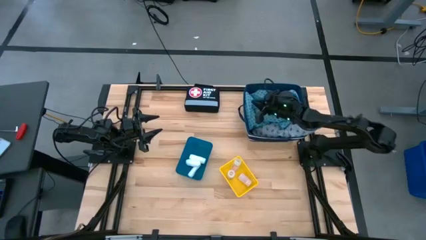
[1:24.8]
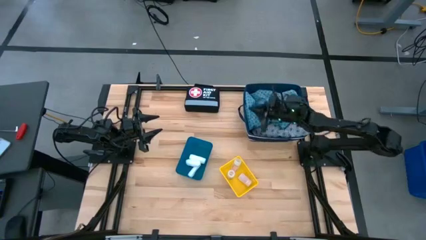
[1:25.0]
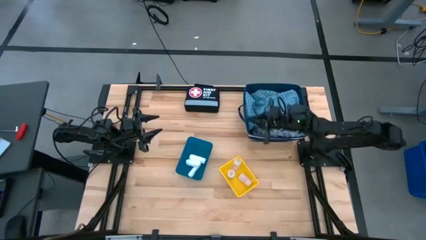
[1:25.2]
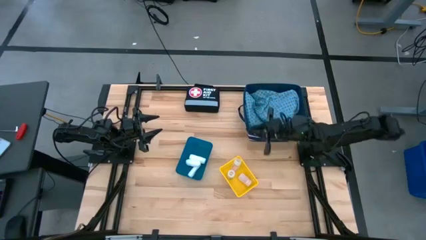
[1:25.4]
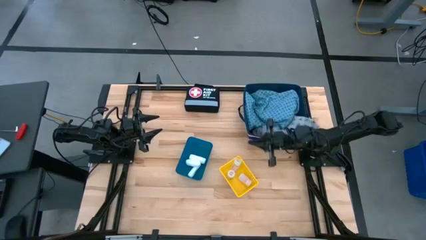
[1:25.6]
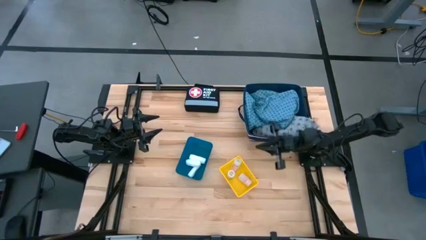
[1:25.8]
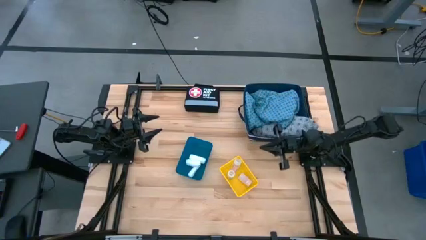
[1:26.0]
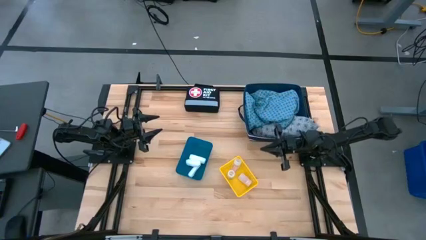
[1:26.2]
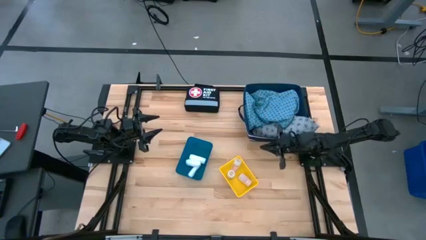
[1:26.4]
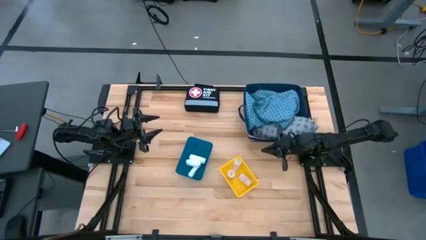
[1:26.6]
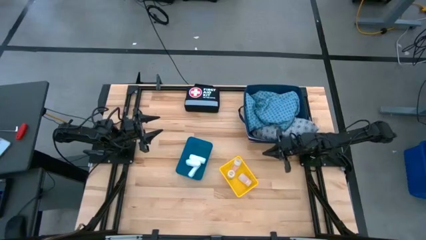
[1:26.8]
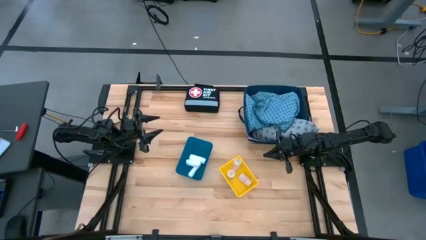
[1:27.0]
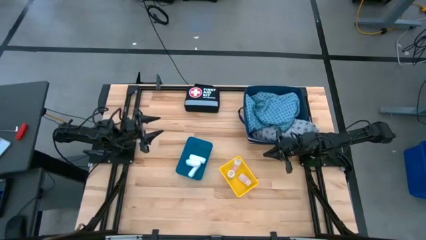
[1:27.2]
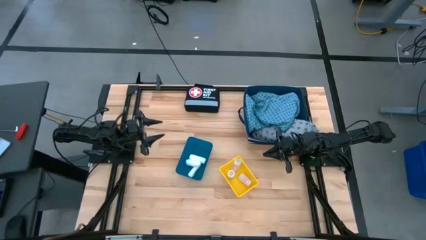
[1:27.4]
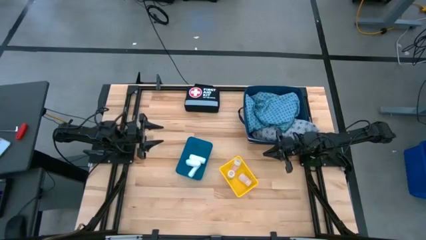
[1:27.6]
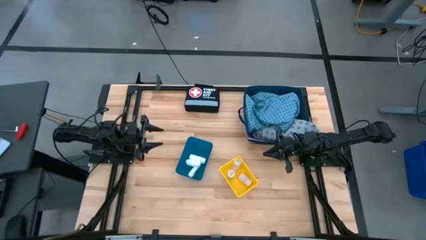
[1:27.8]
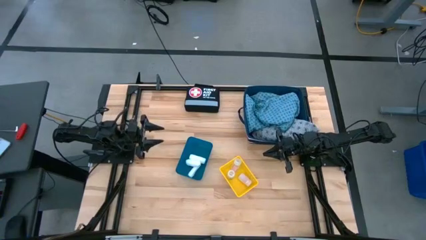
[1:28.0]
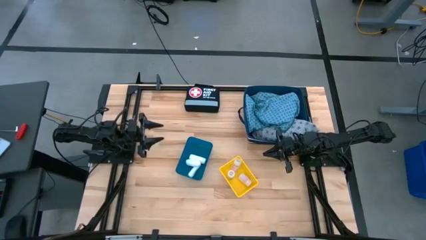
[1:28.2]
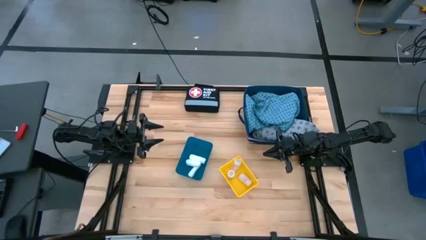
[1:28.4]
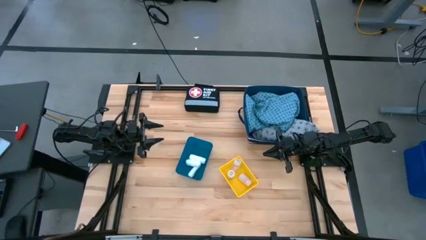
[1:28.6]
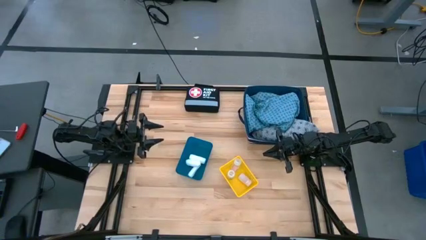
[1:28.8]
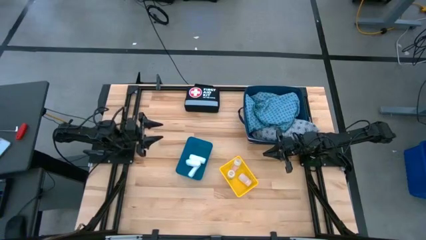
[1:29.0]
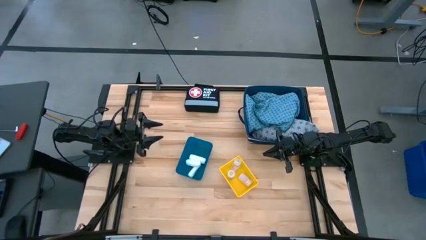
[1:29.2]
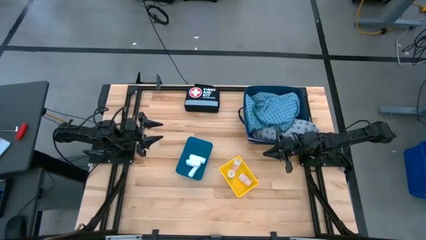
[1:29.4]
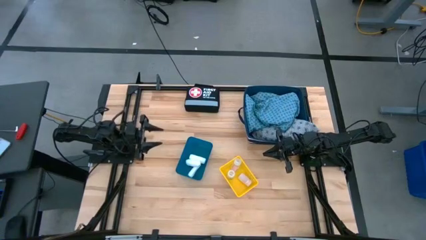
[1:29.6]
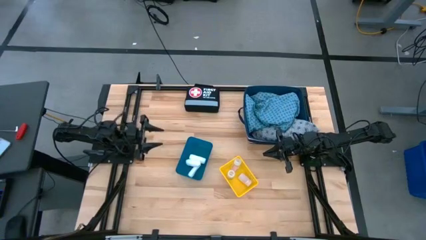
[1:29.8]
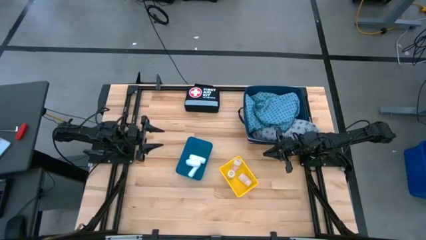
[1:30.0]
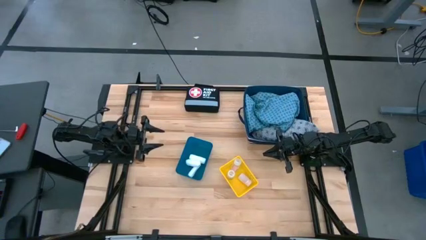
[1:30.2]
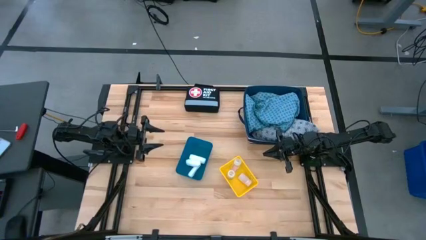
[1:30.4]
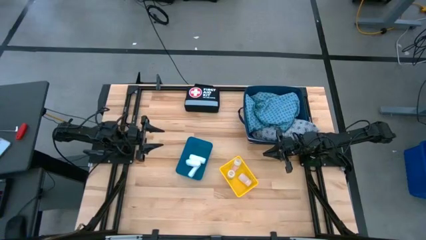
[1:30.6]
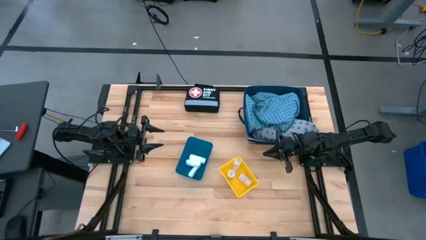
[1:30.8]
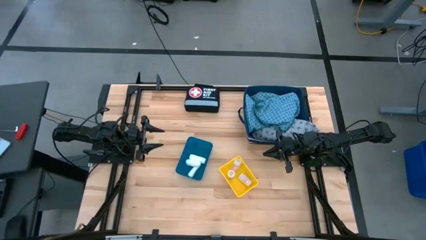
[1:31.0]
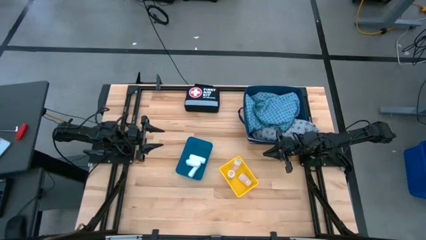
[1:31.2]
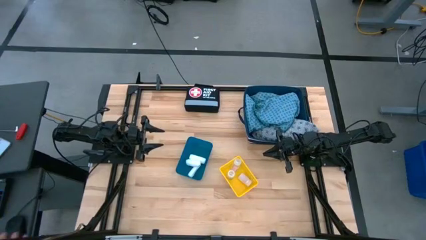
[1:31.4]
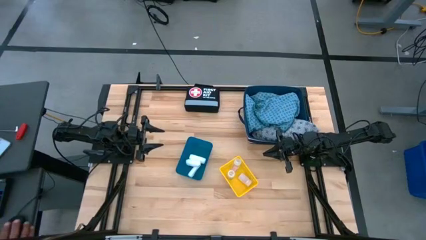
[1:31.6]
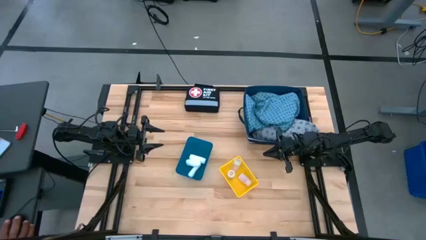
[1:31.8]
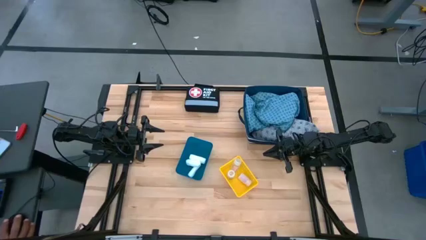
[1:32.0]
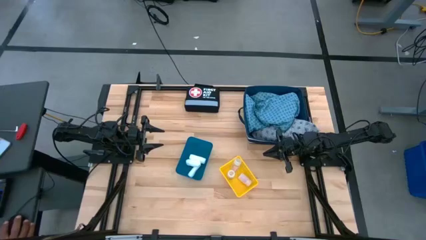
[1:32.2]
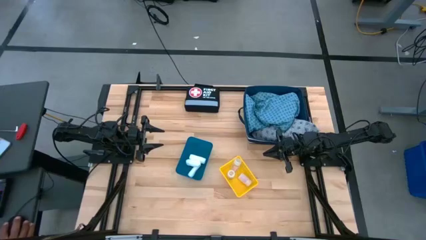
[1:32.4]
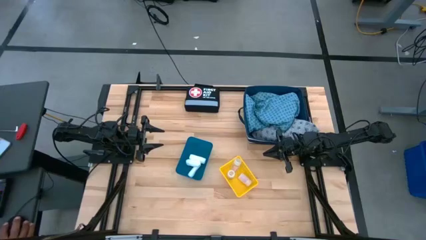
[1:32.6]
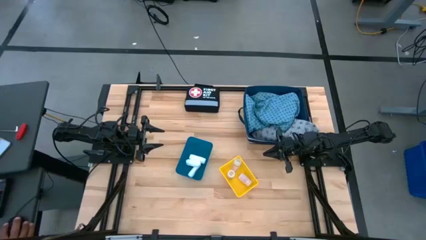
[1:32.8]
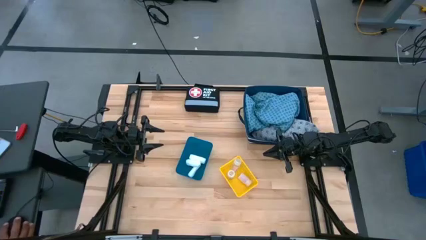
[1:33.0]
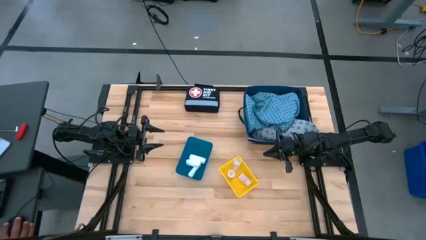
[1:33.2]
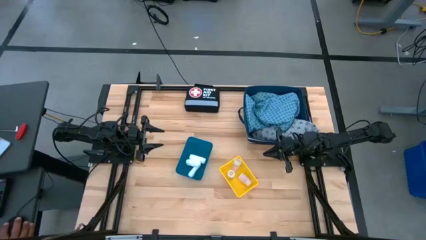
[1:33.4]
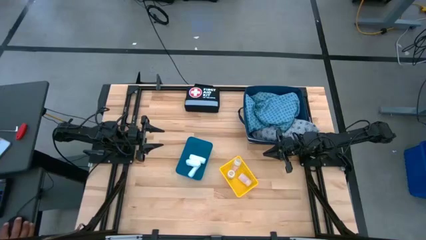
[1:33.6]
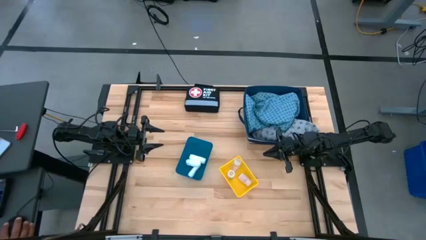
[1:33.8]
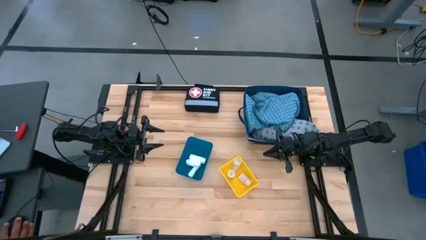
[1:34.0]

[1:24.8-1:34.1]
Task: Pick & place medical supplies in basket/bin
Return to Home Position

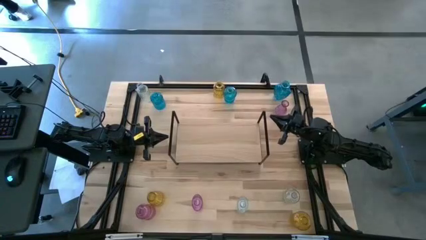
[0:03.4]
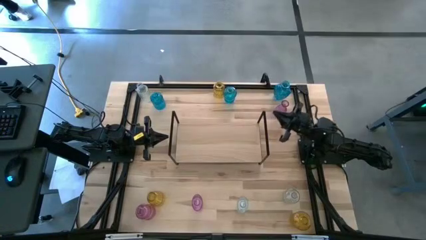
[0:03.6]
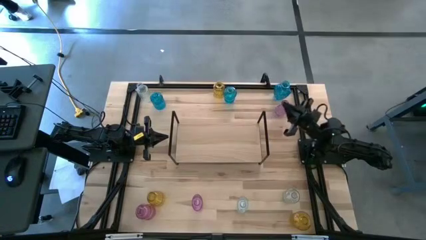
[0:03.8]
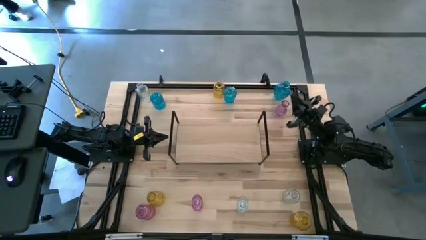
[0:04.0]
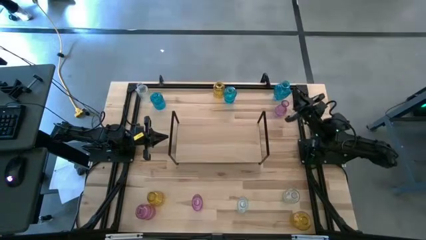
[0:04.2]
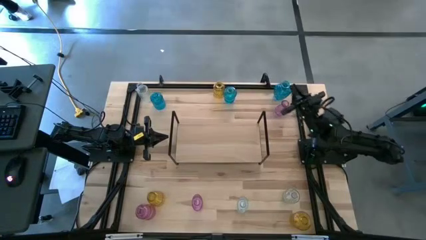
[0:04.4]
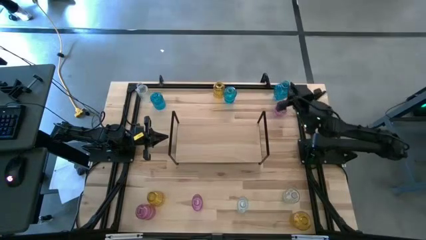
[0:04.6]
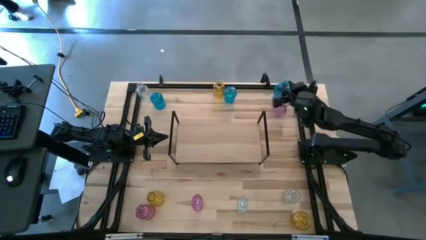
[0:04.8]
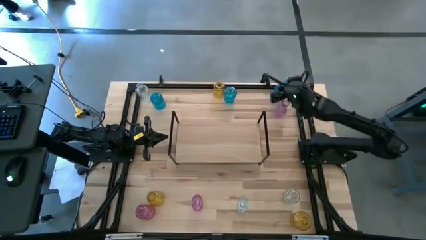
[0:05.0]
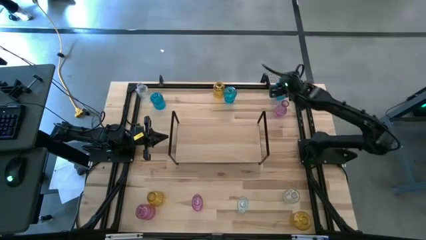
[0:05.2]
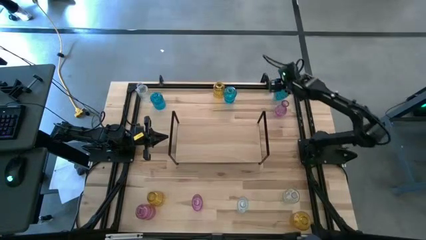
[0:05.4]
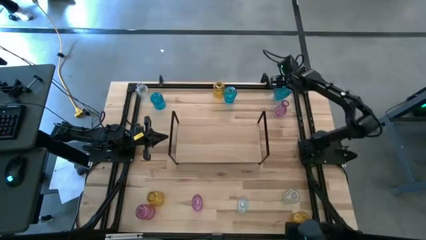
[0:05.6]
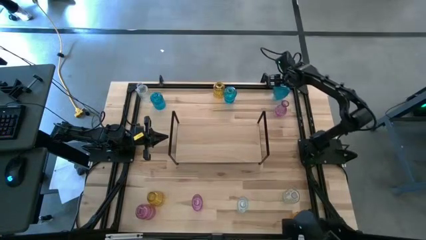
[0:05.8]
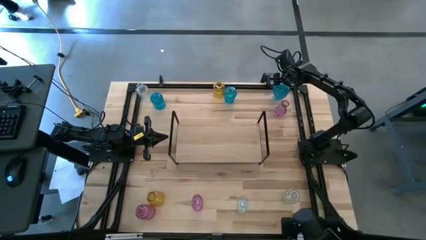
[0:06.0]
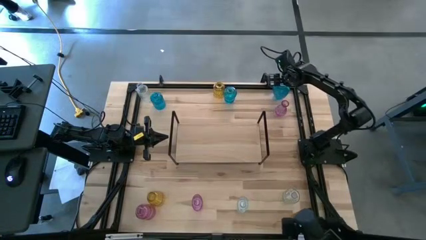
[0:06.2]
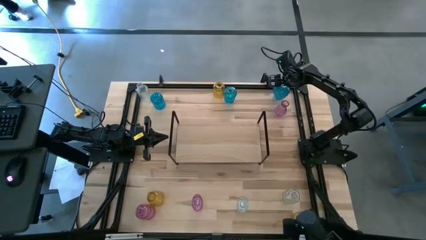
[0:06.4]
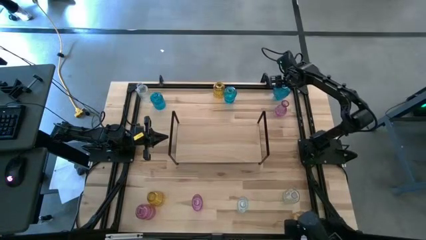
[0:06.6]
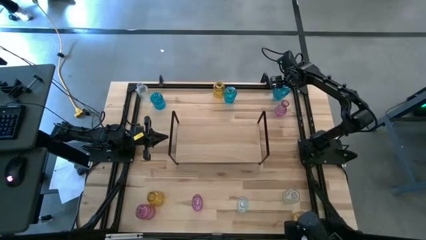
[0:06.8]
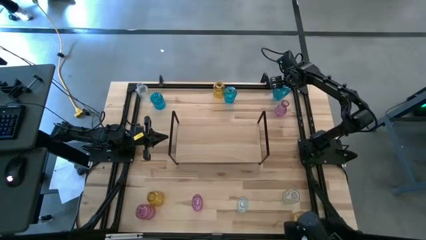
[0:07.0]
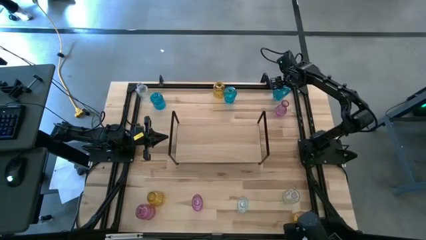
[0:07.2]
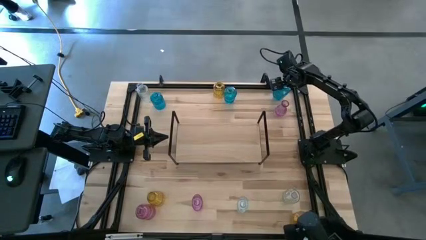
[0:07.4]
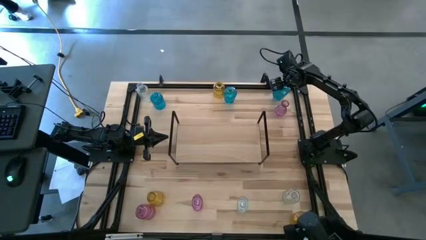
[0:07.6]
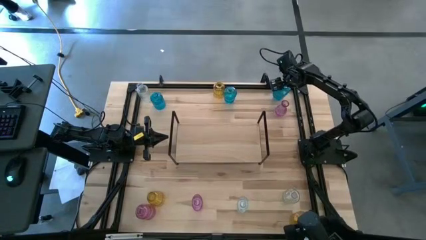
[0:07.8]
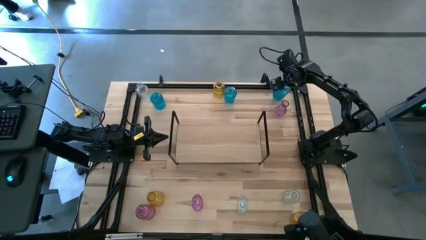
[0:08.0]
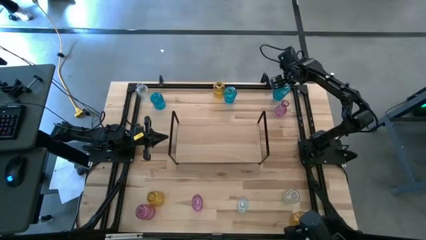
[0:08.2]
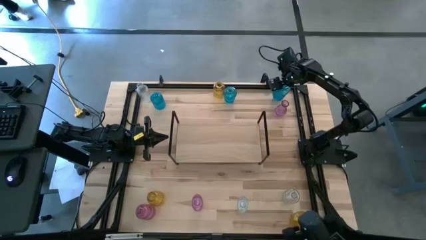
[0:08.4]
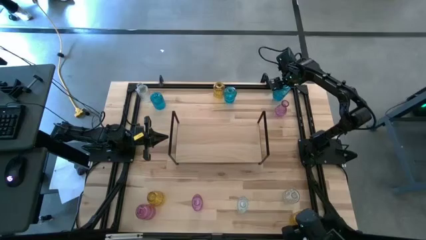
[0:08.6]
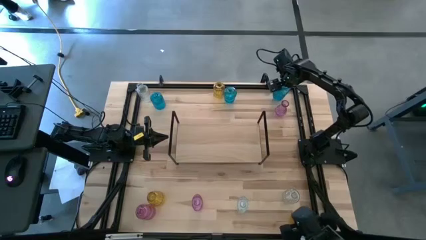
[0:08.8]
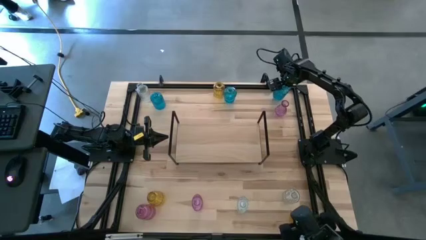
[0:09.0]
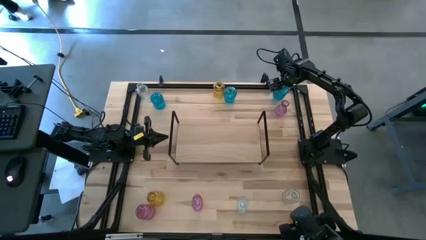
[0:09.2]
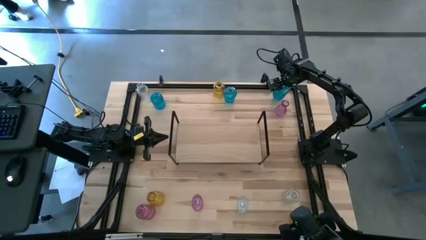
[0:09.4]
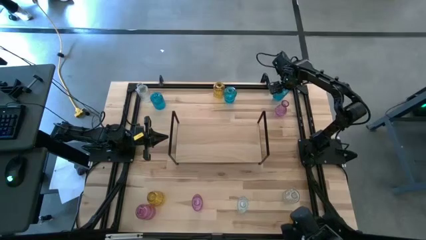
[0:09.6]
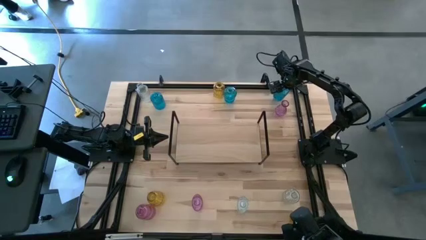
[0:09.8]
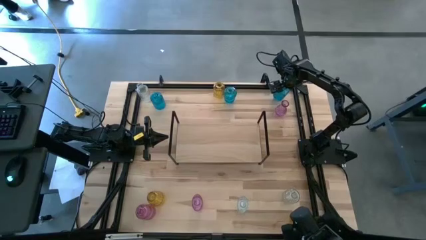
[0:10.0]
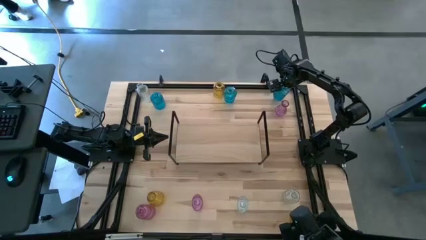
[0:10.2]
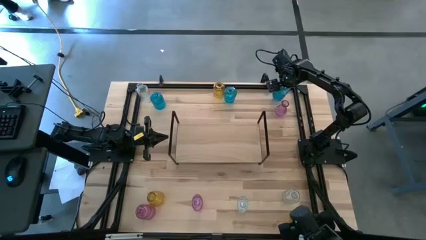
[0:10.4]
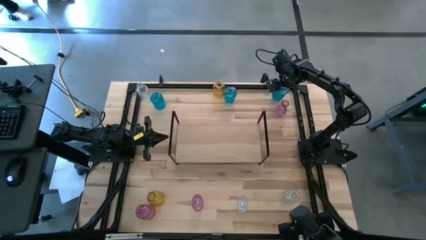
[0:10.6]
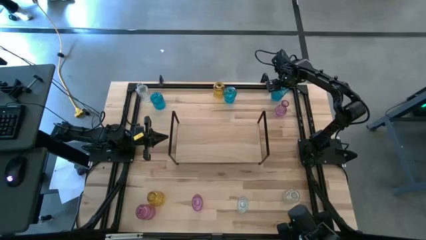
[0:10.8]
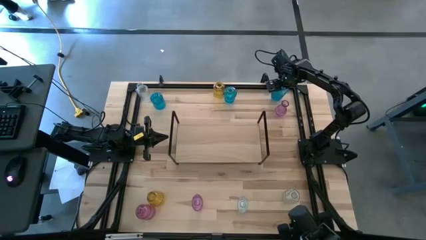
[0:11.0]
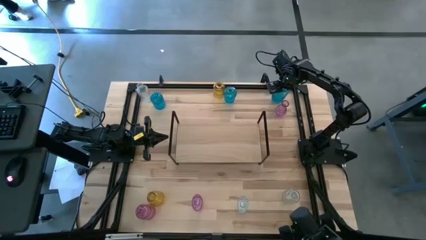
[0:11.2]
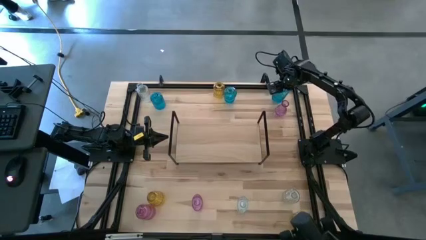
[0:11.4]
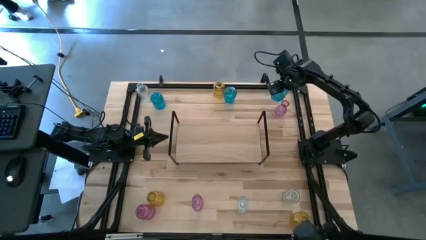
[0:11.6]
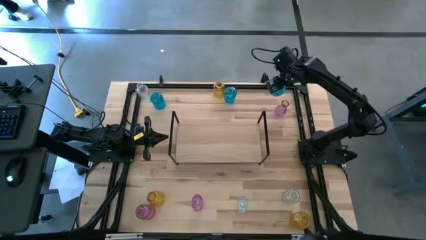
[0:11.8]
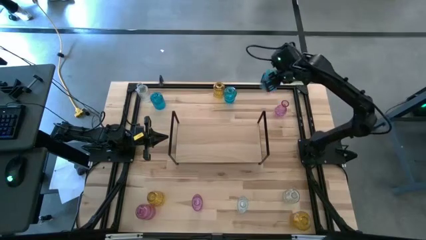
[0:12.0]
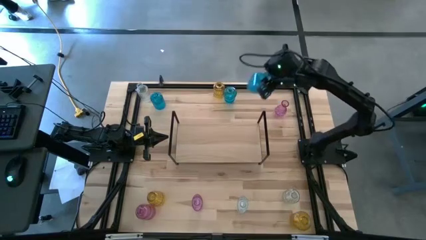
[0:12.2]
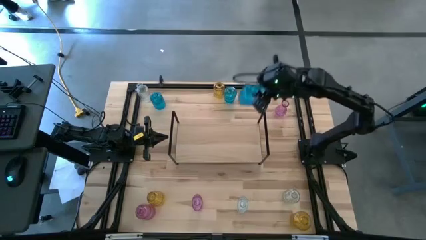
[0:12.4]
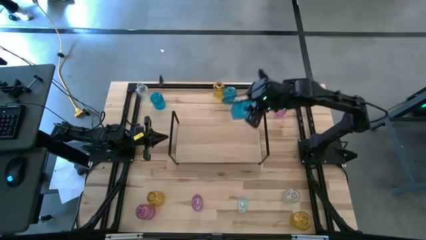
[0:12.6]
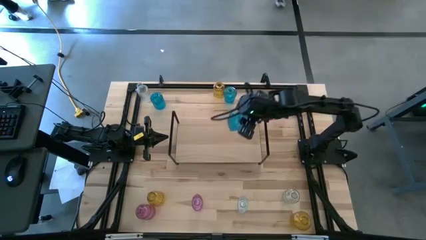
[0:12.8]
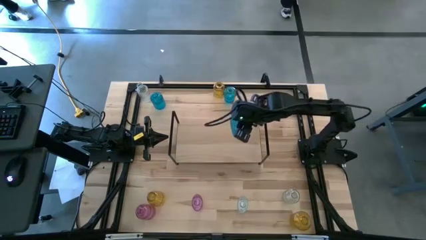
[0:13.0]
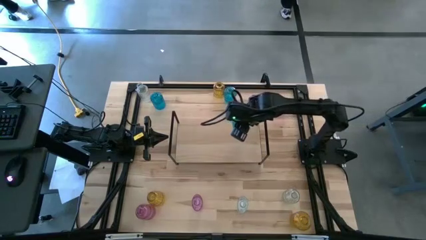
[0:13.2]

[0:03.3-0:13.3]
Task: sort vases onto shelf
Put the right blue vase on the shelf
